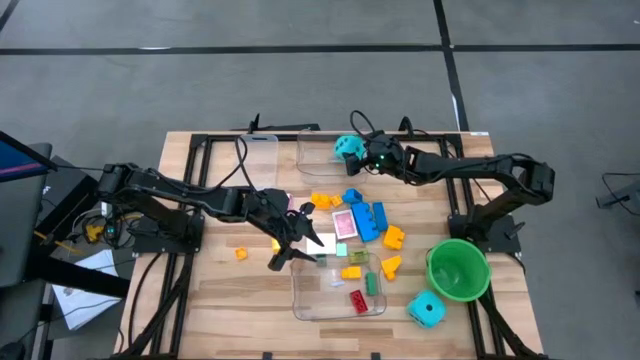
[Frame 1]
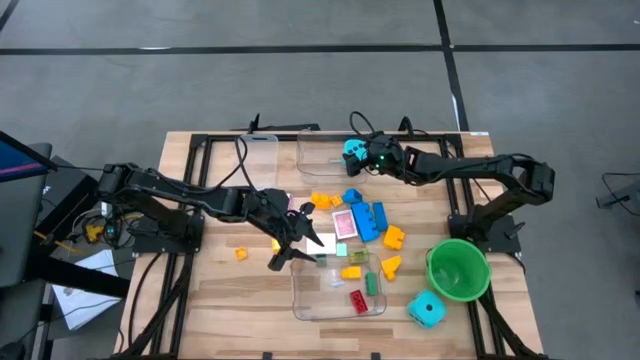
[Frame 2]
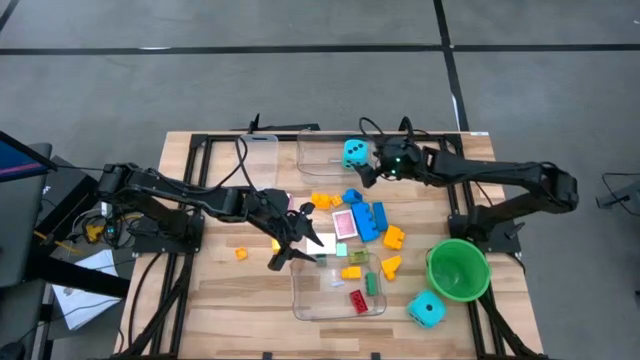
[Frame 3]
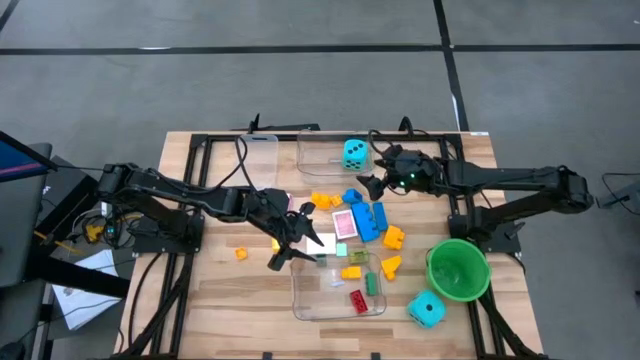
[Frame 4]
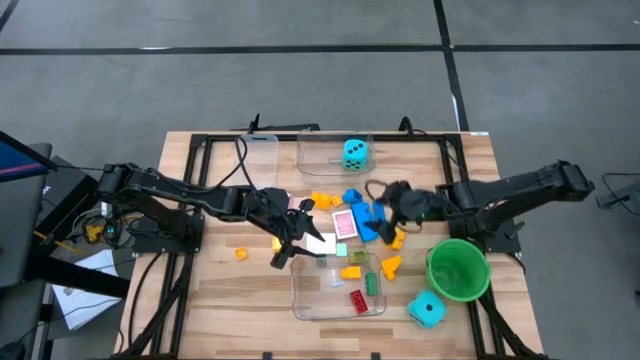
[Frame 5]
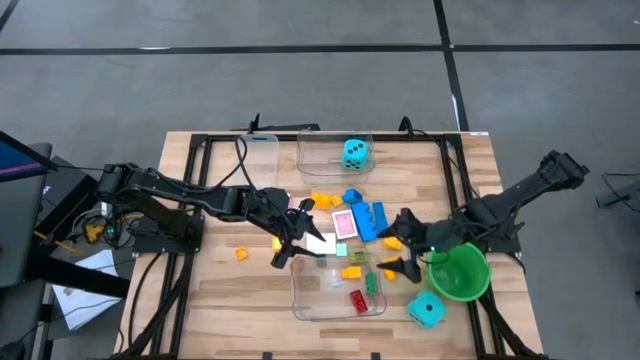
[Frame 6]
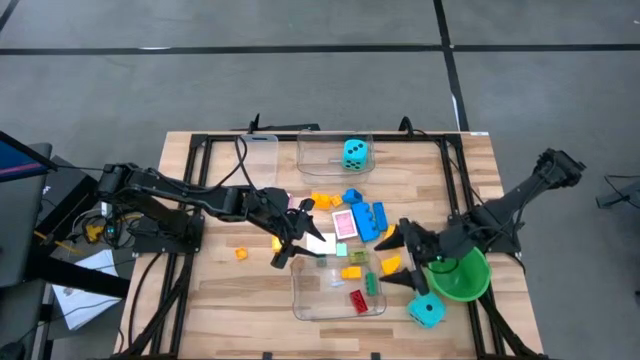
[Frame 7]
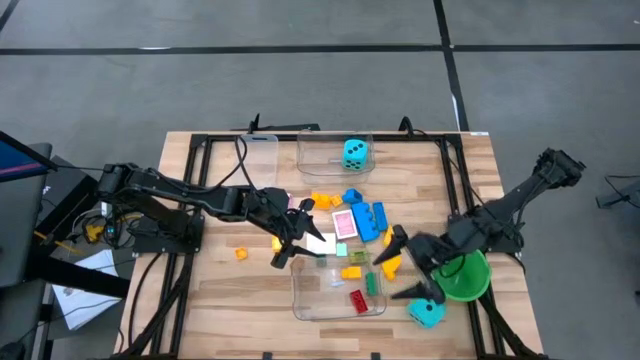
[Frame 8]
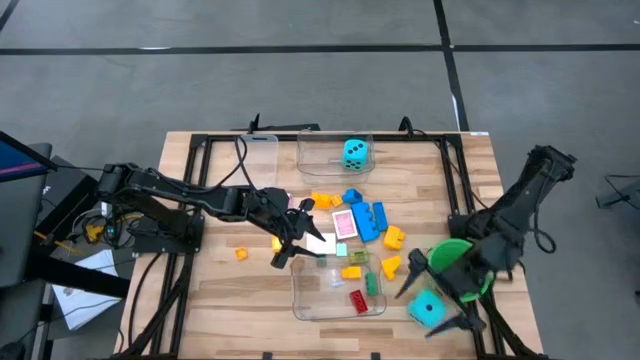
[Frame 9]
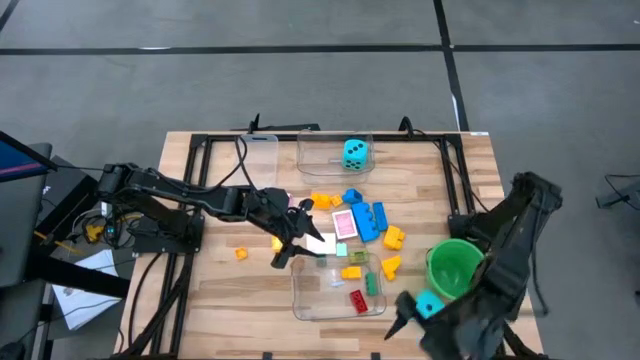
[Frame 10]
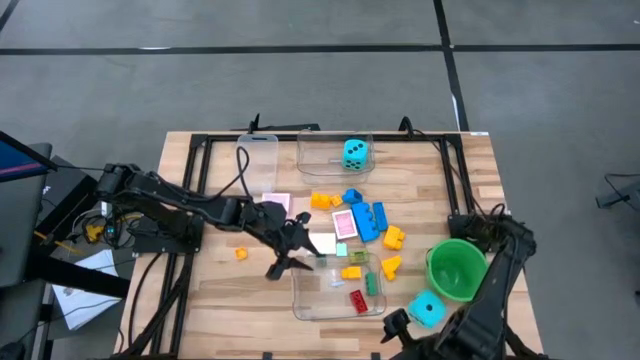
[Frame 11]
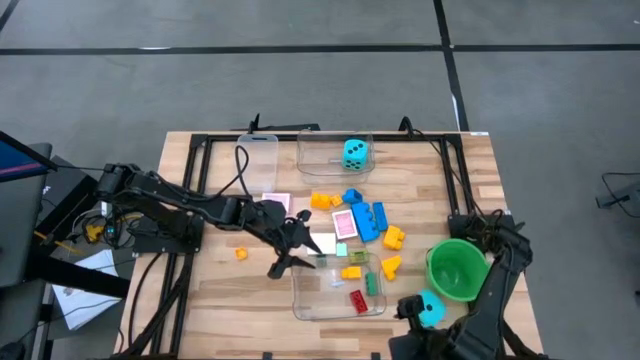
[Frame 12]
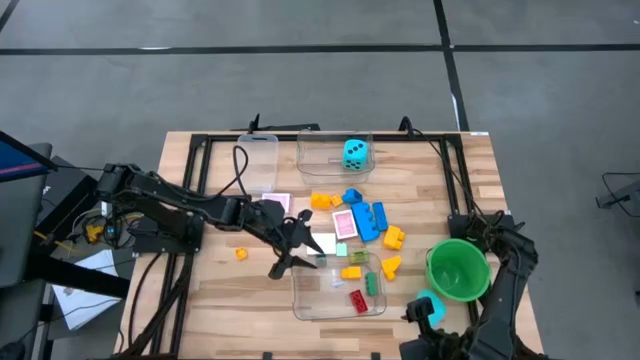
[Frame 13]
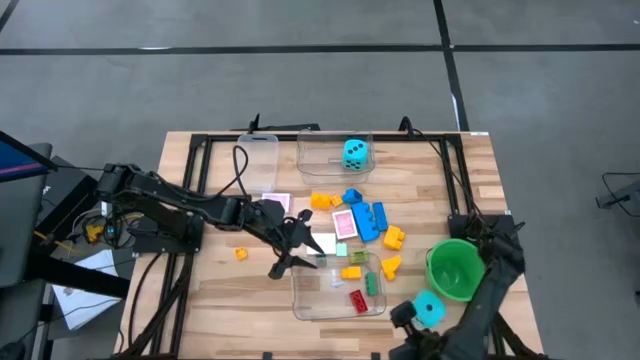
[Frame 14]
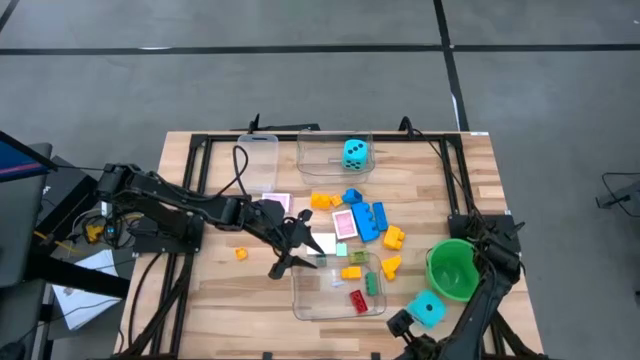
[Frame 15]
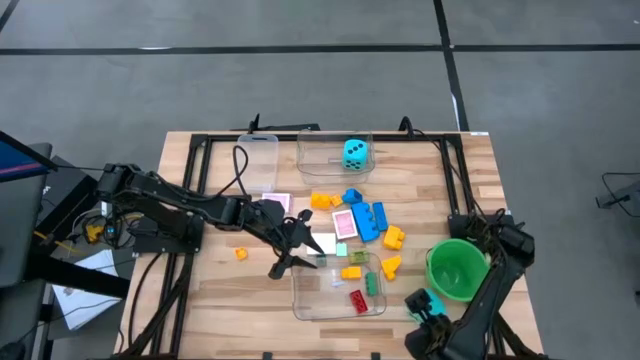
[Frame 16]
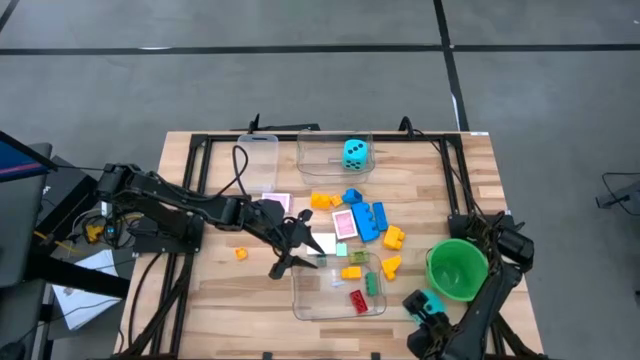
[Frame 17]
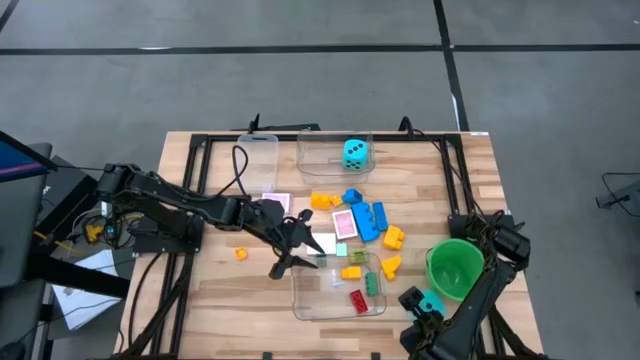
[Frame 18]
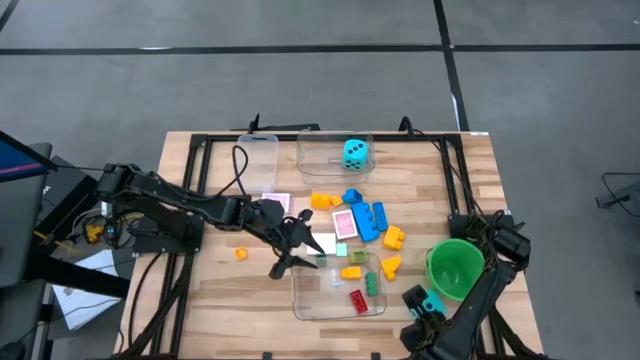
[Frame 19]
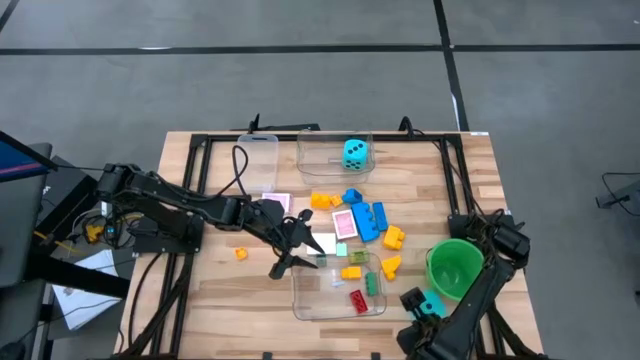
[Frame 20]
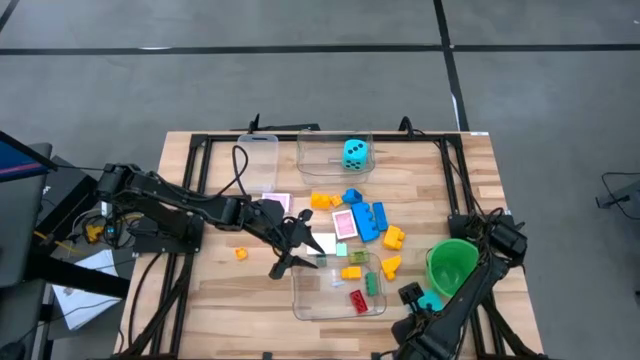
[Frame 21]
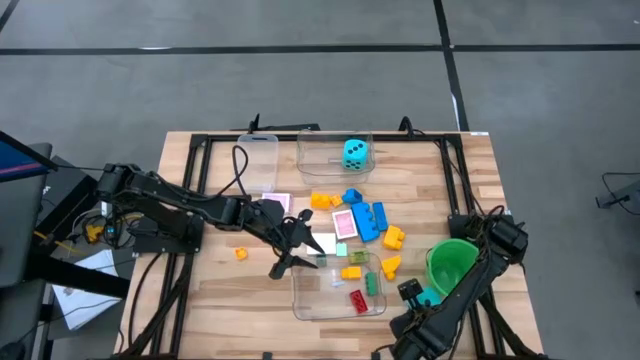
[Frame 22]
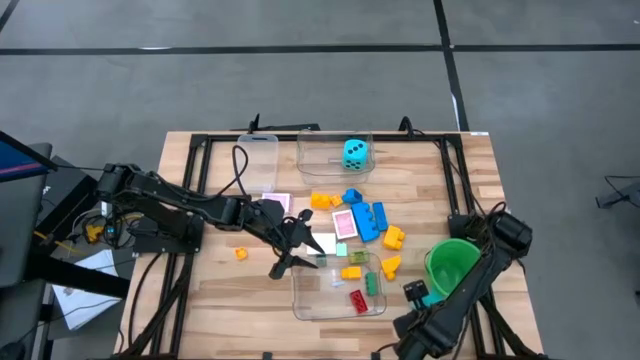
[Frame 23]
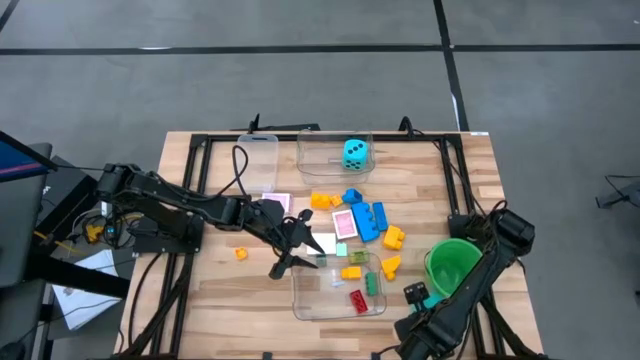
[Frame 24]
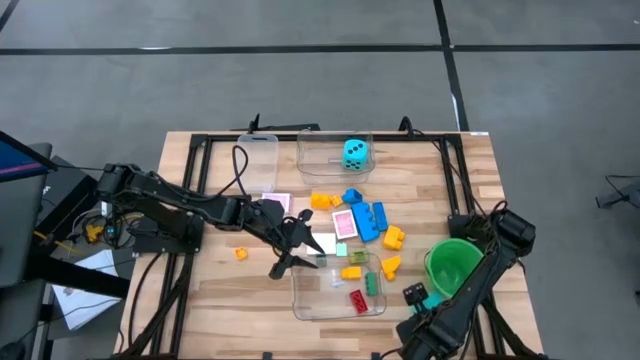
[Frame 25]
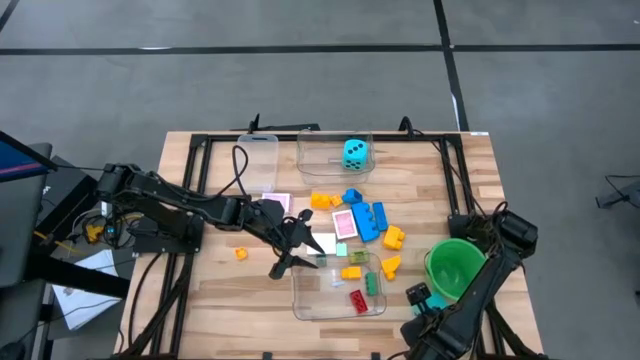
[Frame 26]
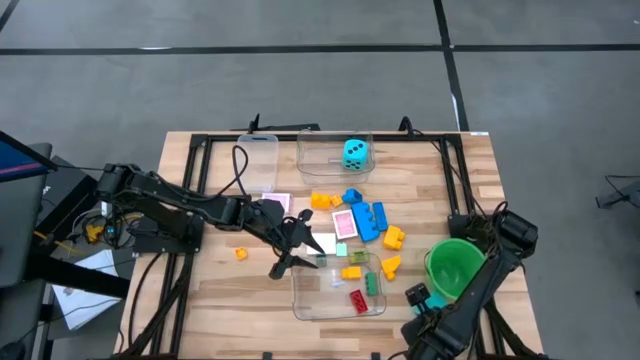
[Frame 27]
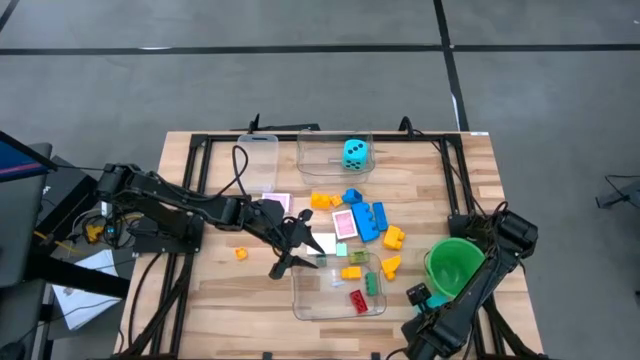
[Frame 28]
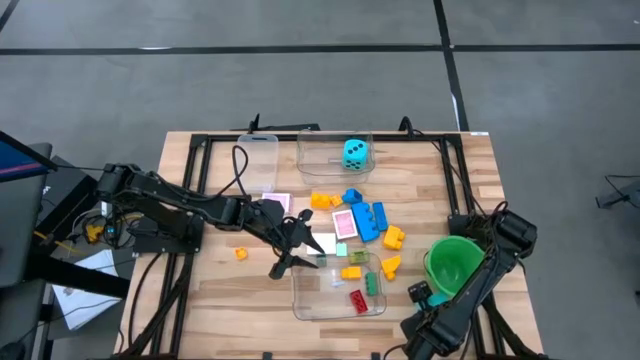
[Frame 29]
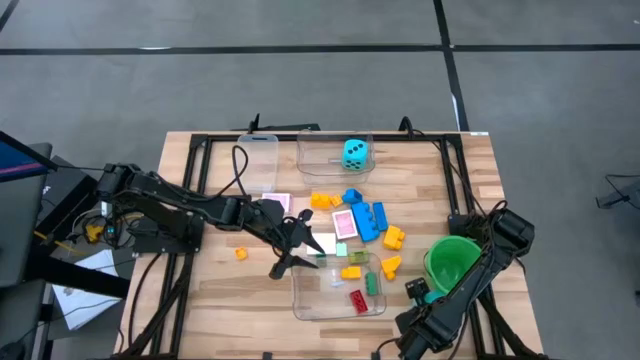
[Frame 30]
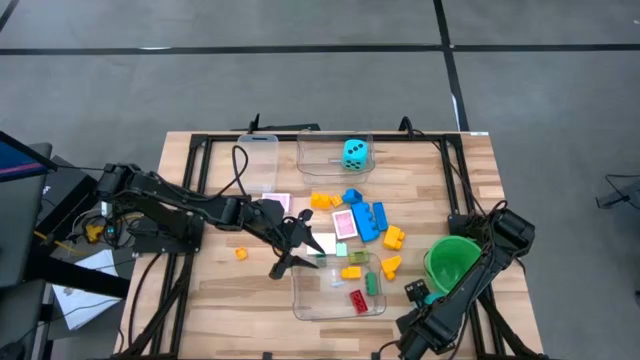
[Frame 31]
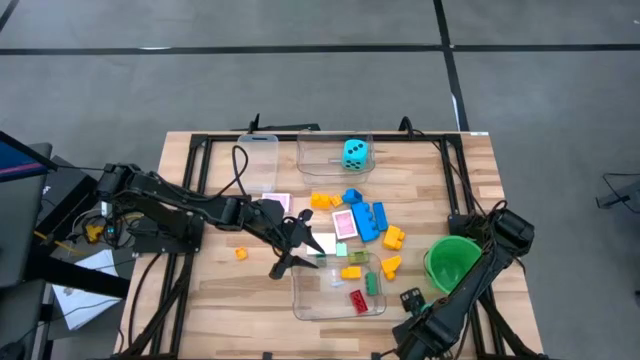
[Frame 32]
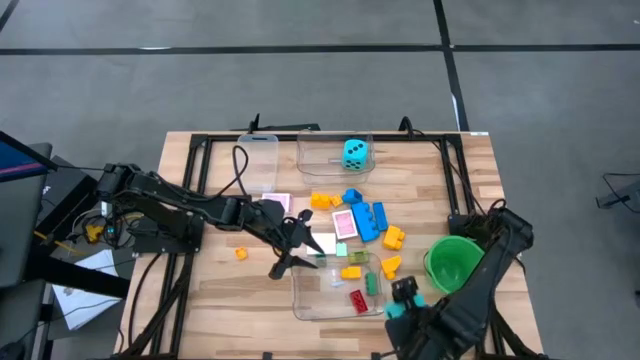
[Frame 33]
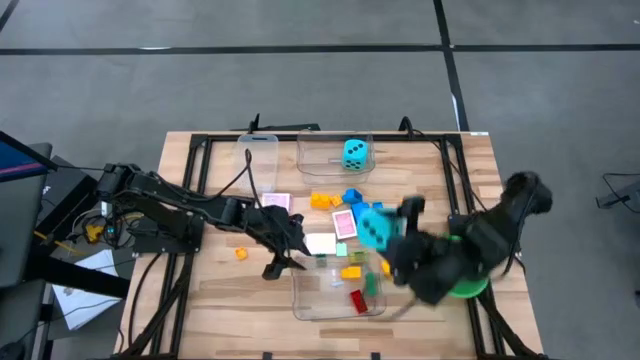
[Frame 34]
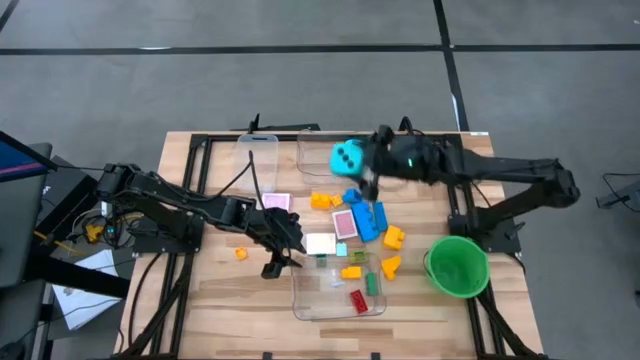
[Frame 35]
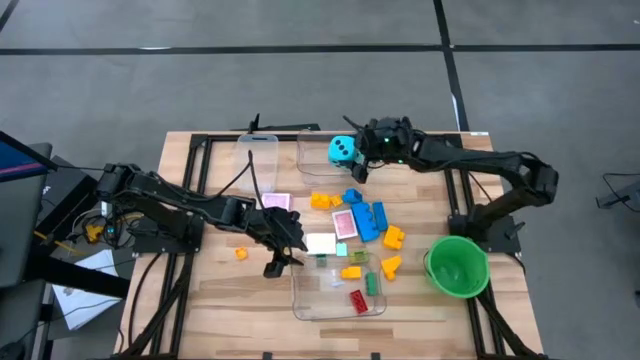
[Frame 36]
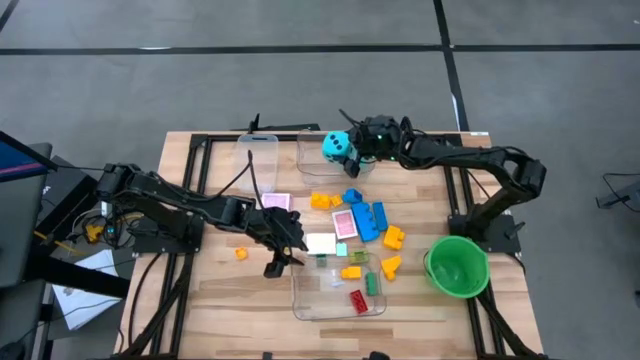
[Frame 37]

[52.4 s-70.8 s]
Task: Pick & Place Toys
Put the light blue die into the top transparent bin

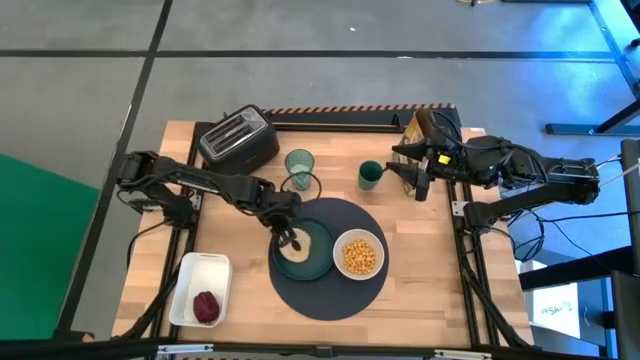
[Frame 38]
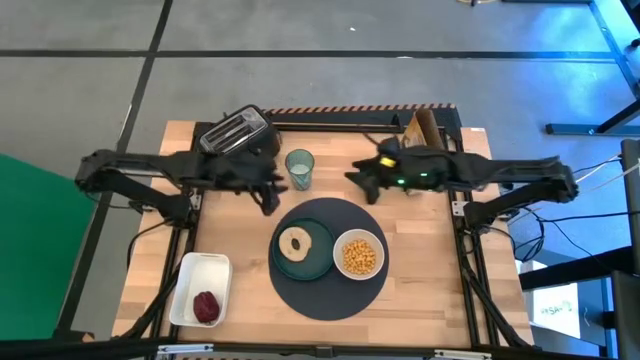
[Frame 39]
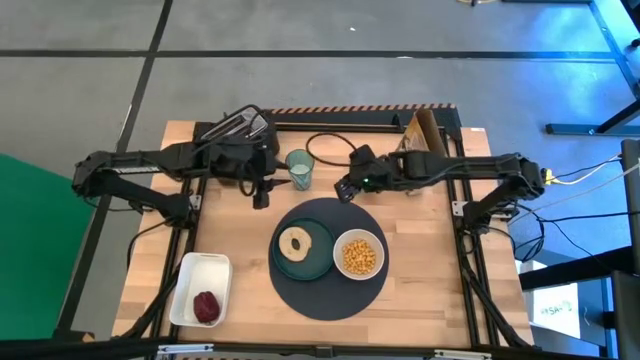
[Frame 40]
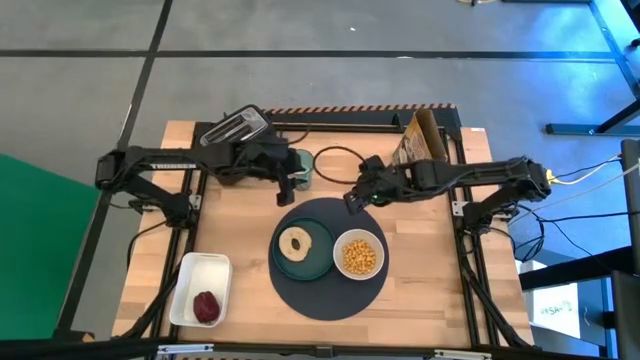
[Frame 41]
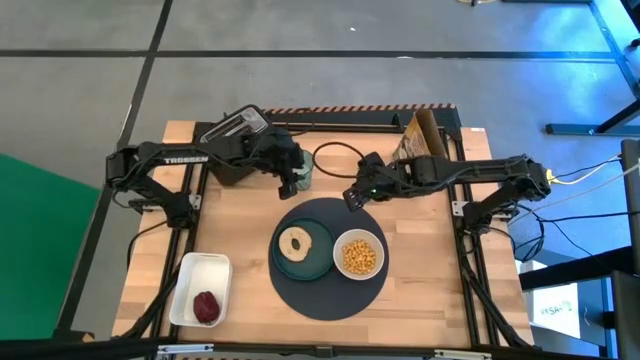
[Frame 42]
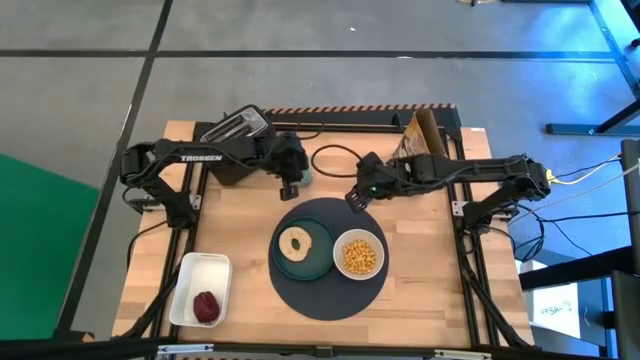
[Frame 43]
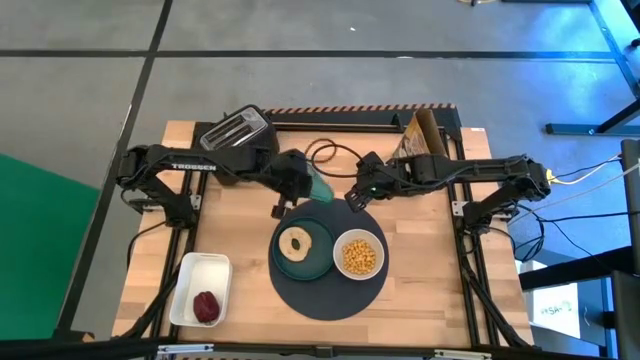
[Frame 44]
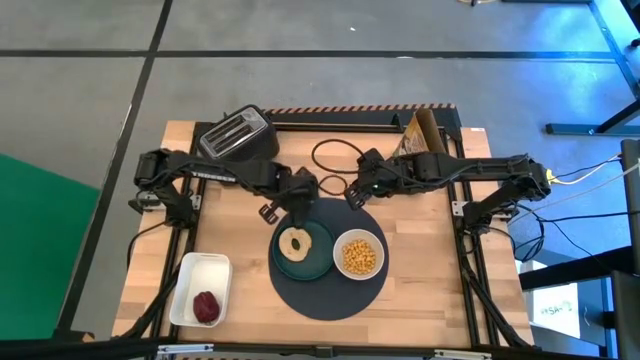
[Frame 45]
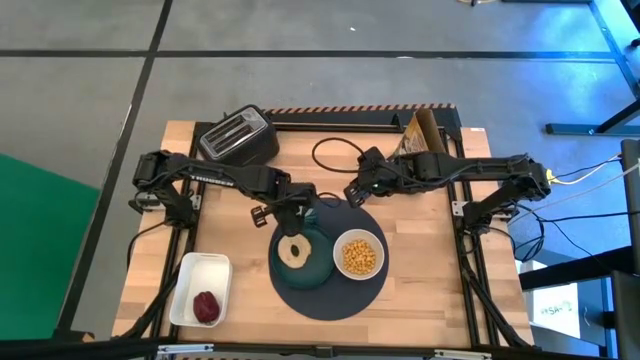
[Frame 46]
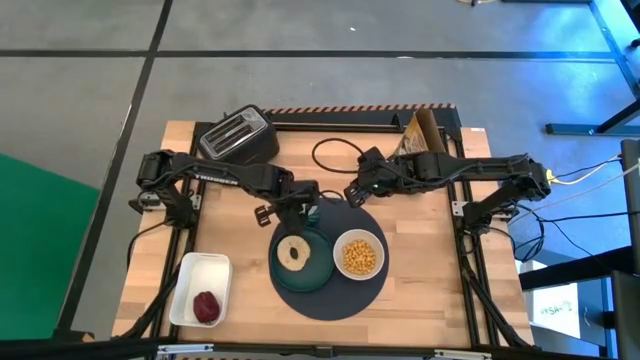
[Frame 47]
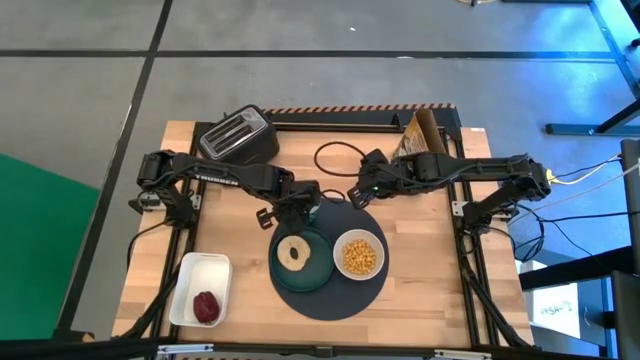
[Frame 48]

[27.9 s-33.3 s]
Task: Arrange a breakfast setting
Put the cup of milk on the blue table mat to the top of the blue plate
